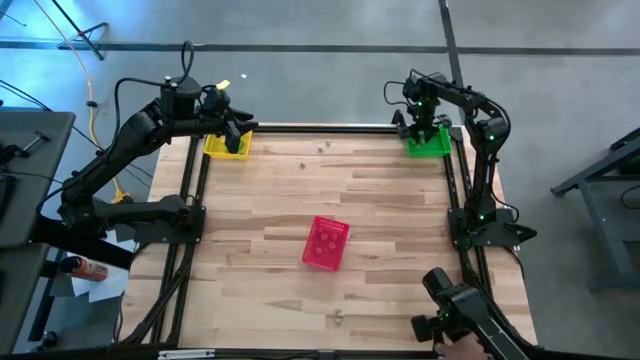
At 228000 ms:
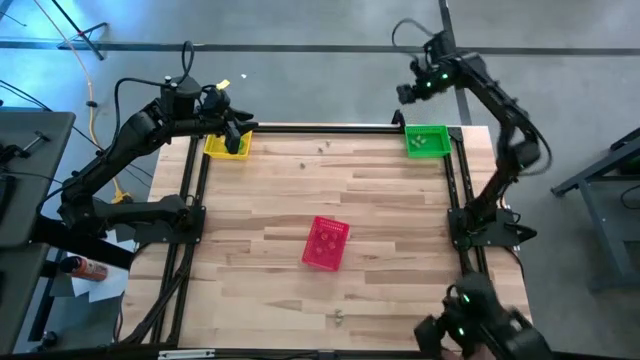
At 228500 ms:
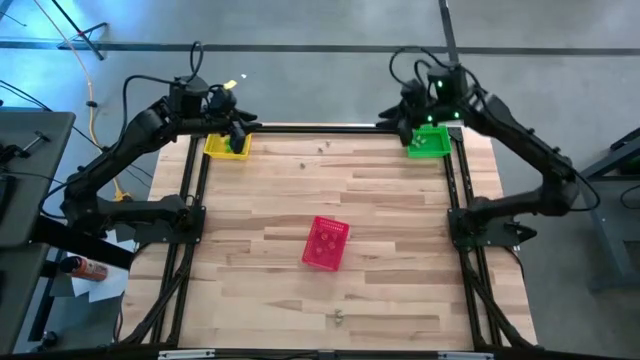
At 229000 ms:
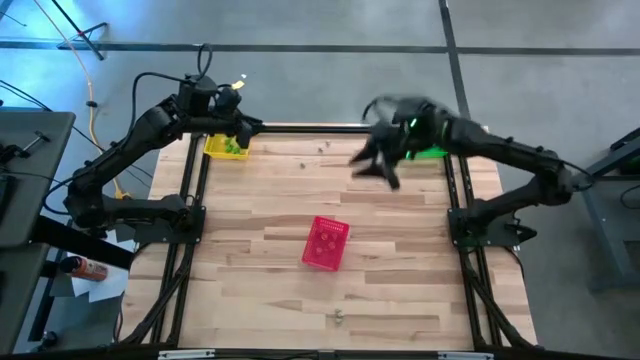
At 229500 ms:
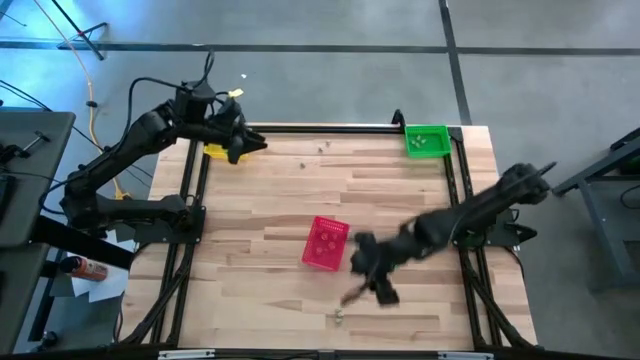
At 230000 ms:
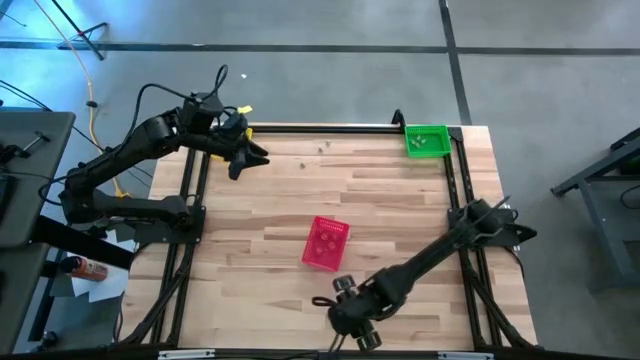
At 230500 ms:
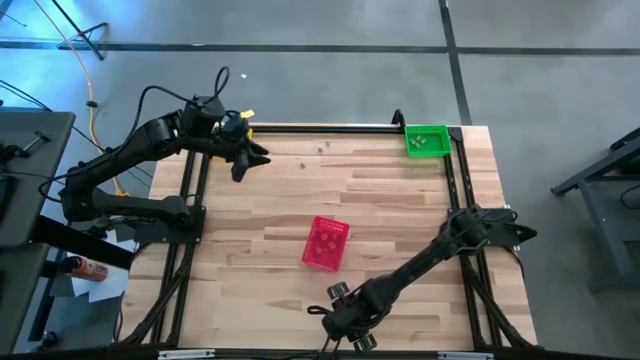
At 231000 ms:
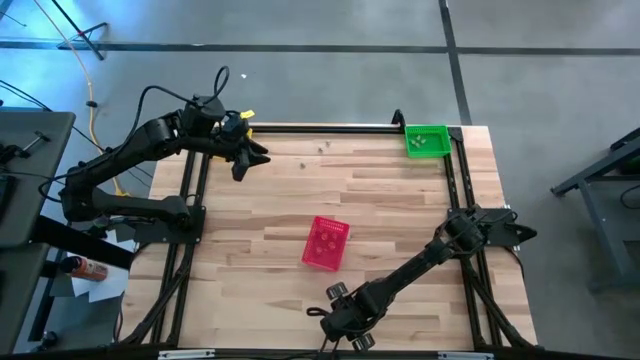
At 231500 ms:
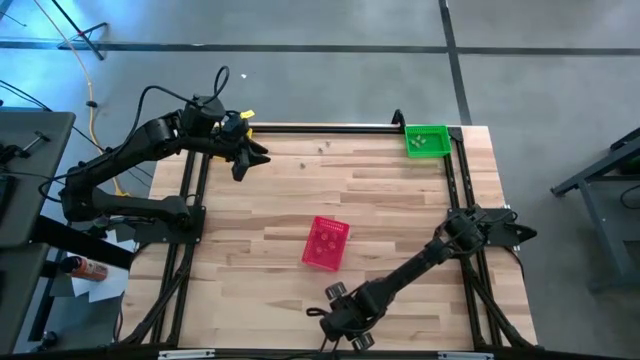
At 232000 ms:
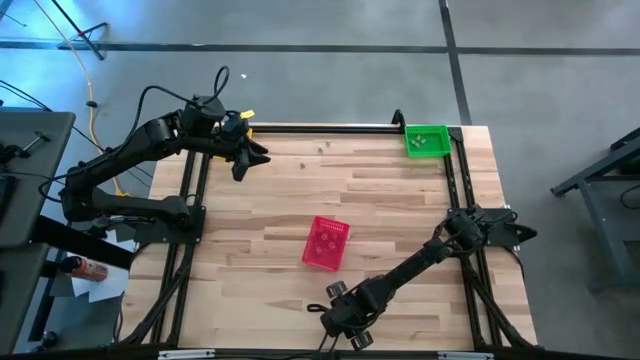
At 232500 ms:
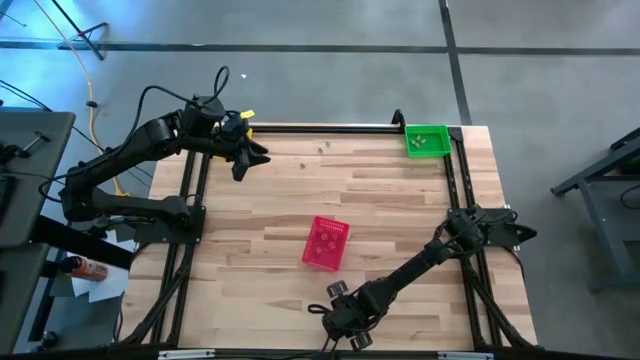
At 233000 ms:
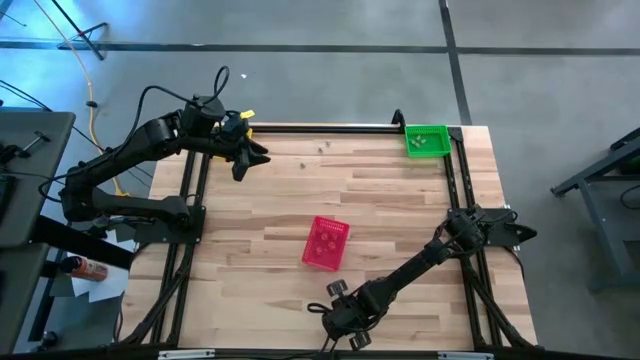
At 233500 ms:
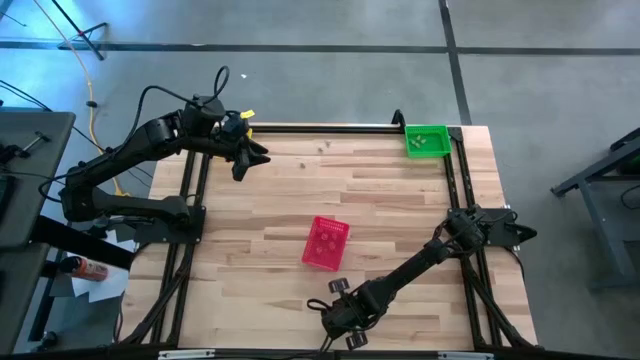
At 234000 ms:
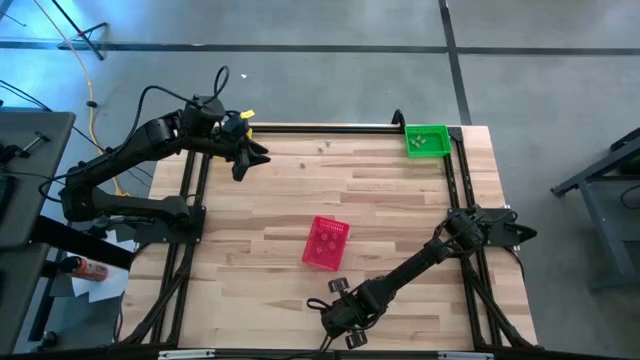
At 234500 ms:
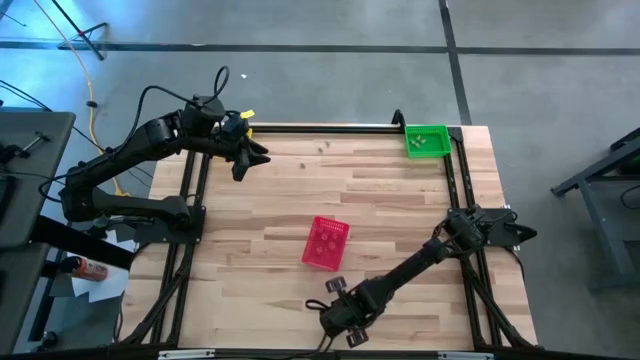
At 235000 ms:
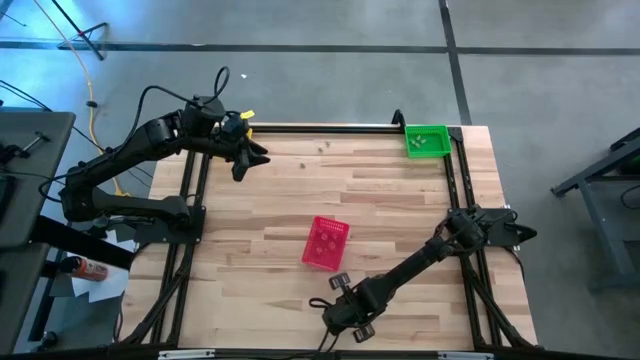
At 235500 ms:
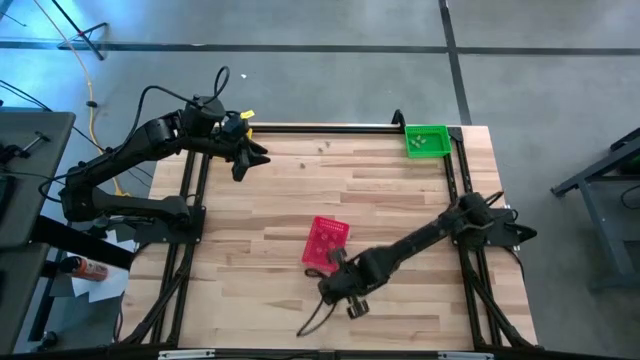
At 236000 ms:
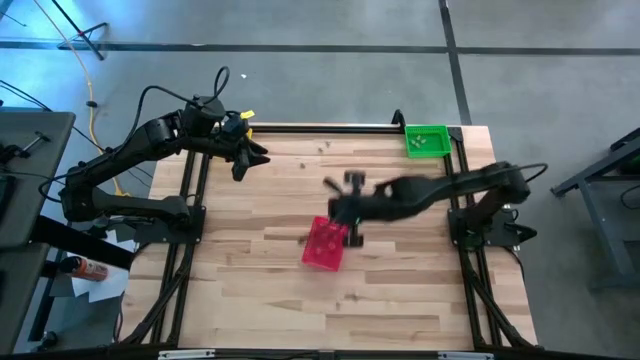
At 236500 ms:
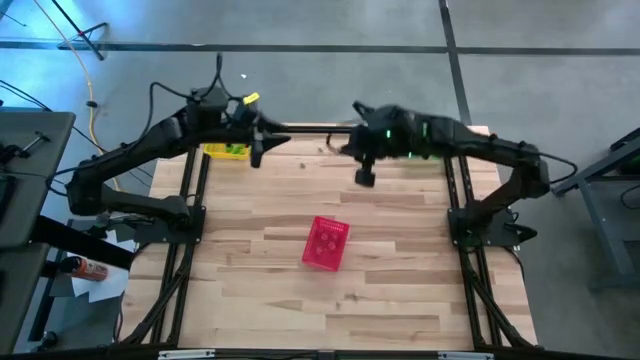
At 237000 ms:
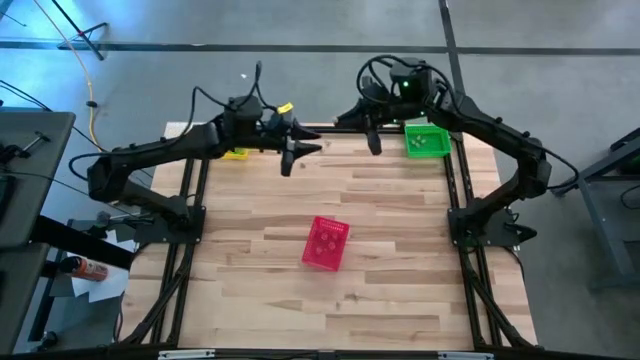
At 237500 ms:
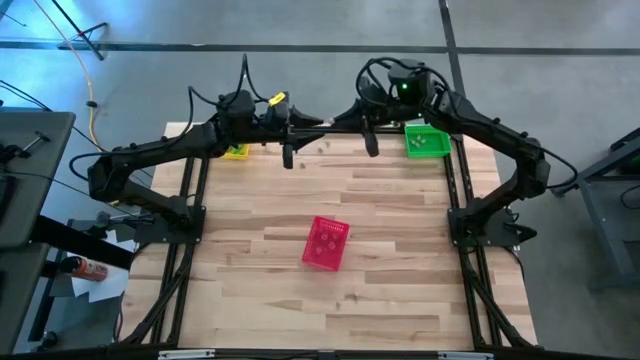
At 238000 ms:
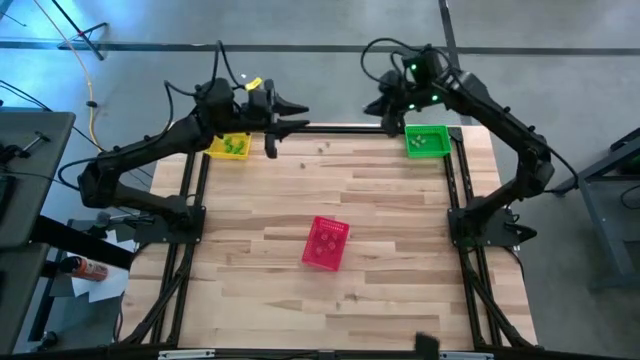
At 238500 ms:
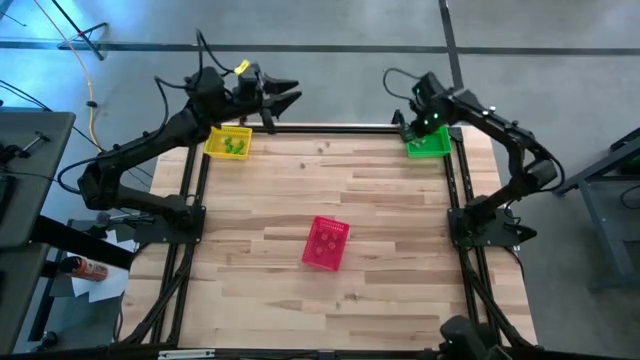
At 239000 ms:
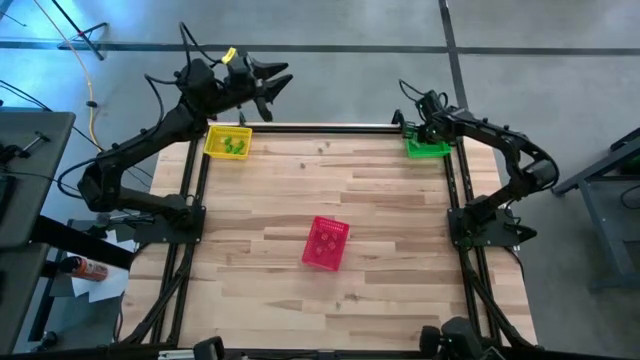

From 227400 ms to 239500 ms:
Task: Sort Halloween decoration
Put the white skull toy into the green bin

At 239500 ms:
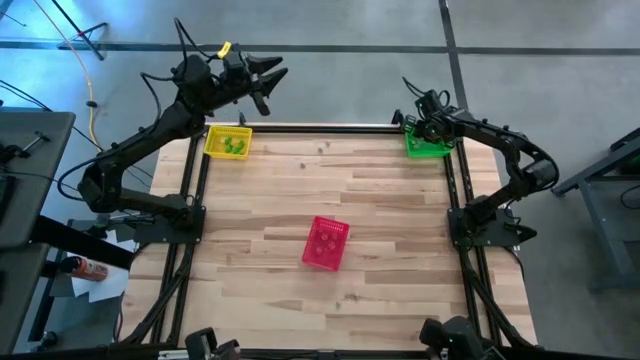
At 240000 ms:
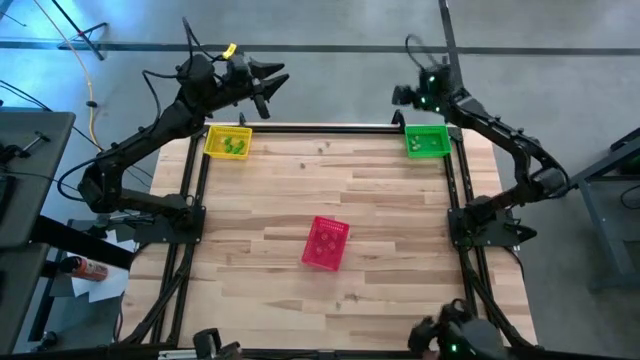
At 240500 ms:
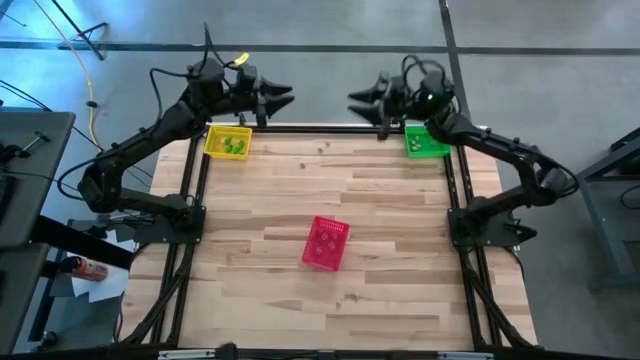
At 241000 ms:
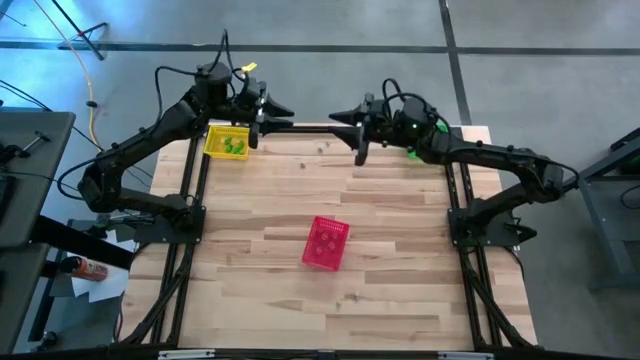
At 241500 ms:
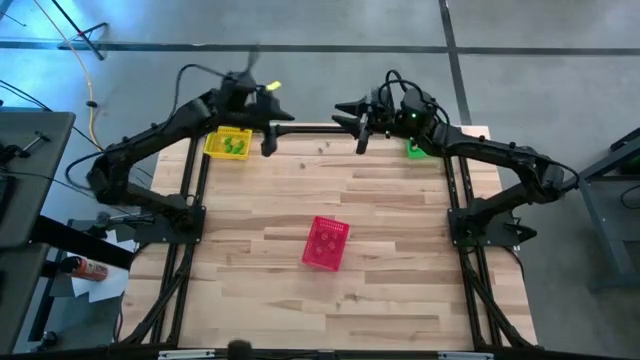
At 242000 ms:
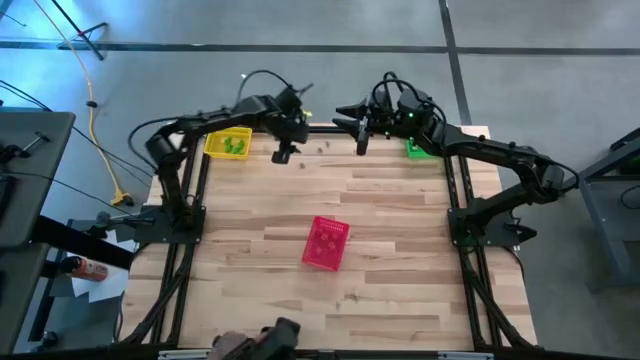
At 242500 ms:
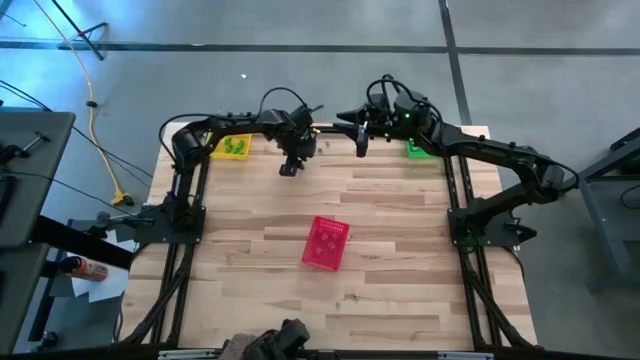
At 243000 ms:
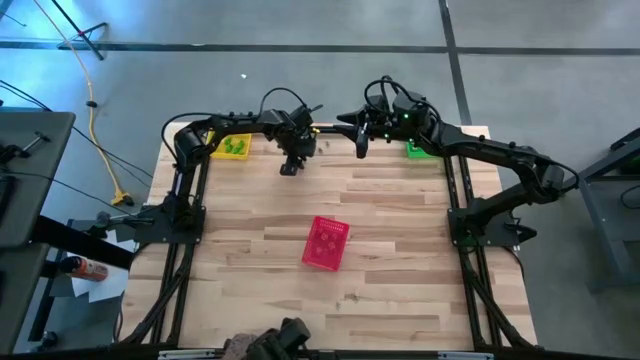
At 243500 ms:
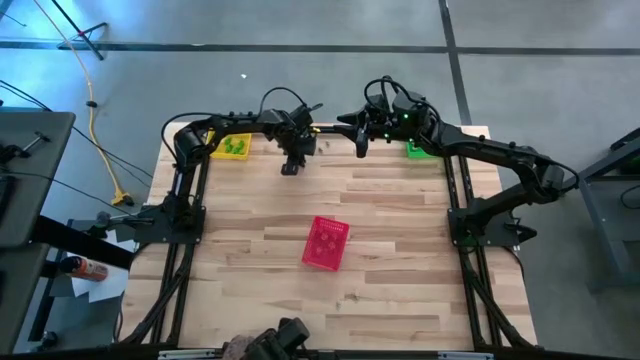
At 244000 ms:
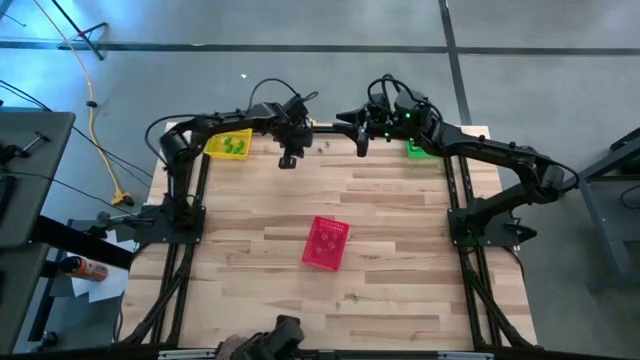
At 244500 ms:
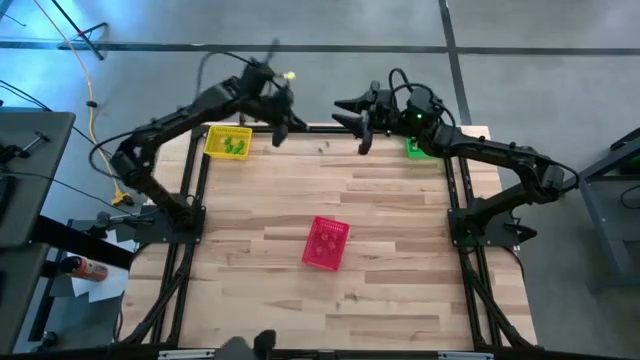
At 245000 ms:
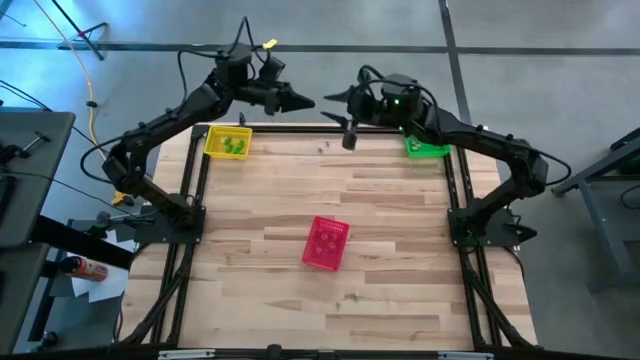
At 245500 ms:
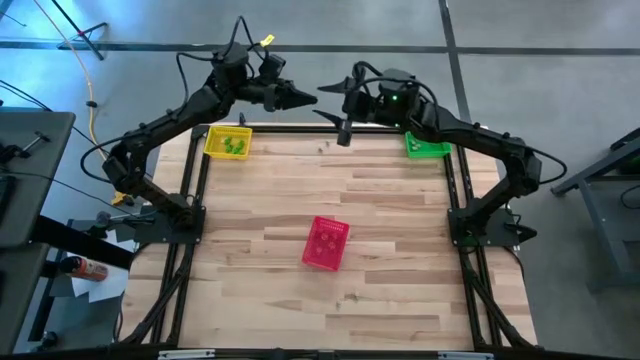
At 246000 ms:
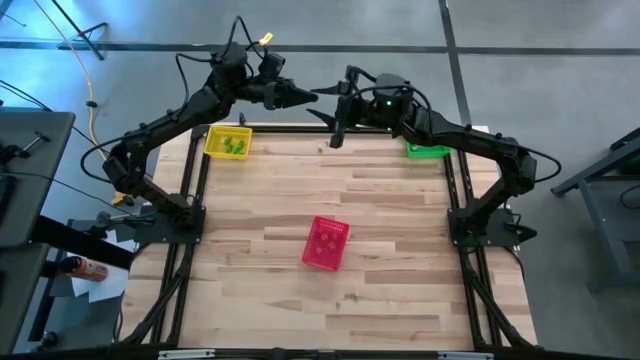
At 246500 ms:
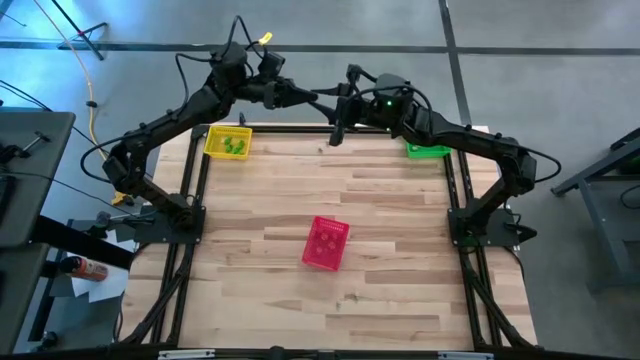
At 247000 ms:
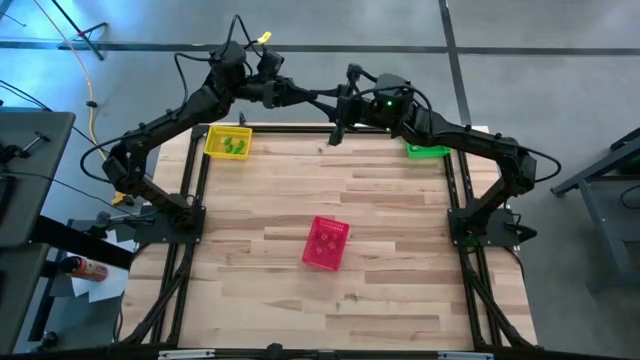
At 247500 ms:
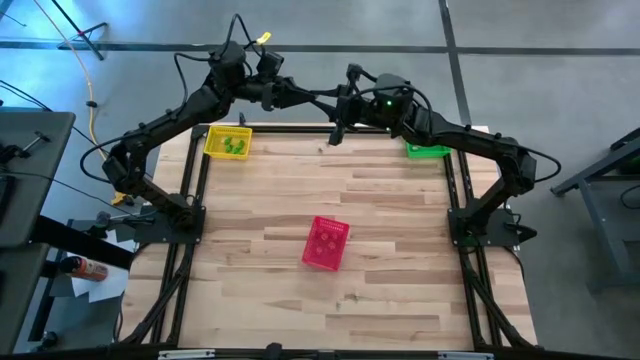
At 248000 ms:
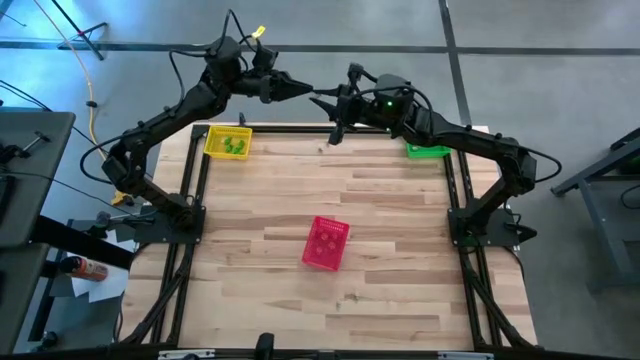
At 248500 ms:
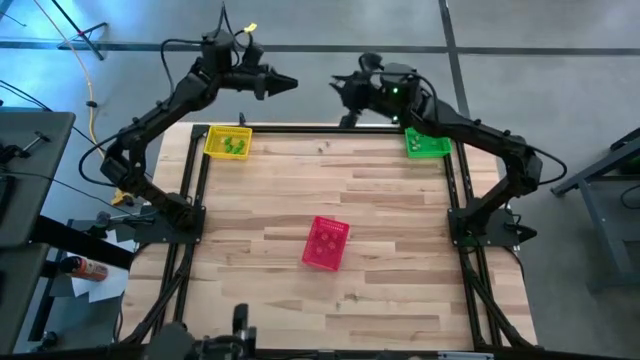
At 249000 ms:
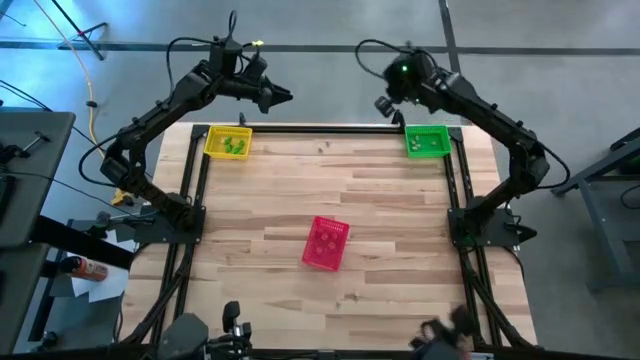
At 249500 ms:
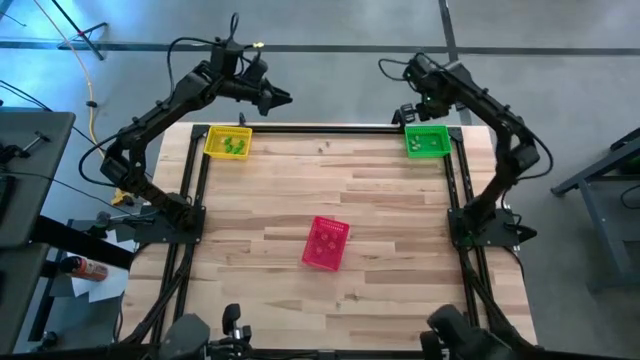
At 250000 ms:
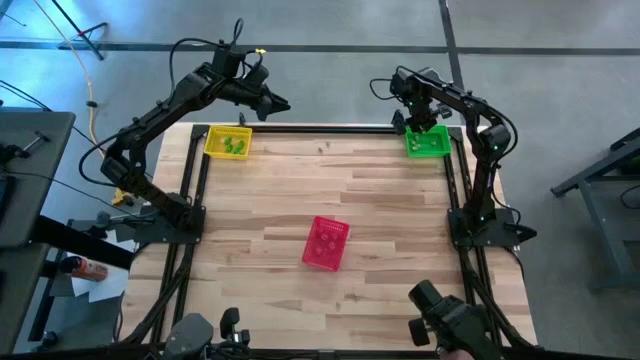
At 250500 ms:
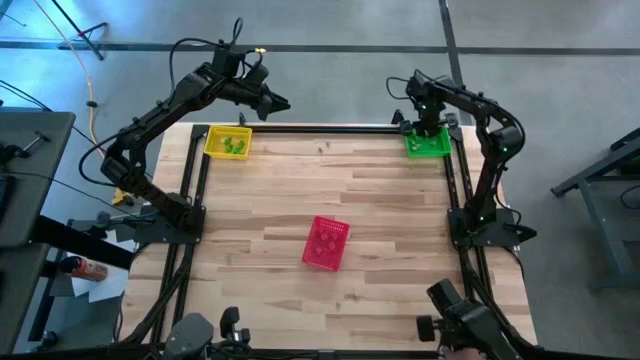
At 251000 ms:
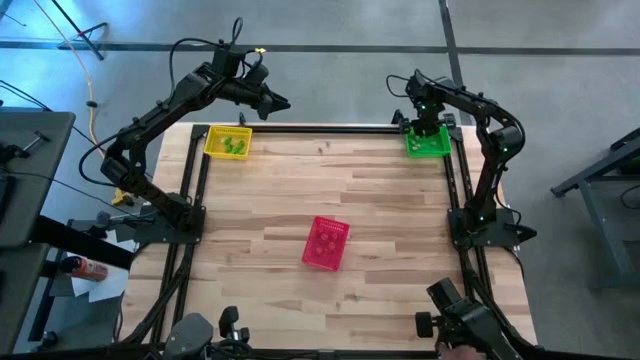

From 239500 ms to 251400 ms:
Put the white skull toy into the green bin
